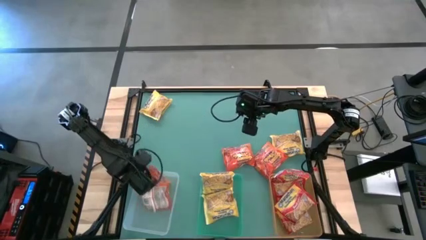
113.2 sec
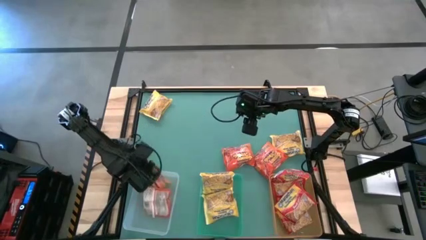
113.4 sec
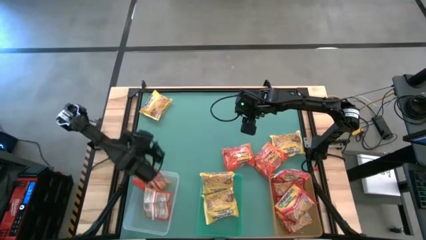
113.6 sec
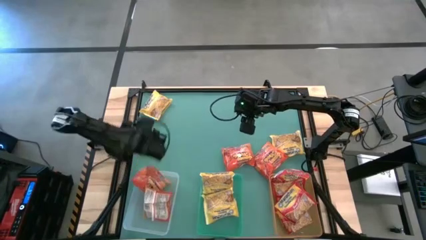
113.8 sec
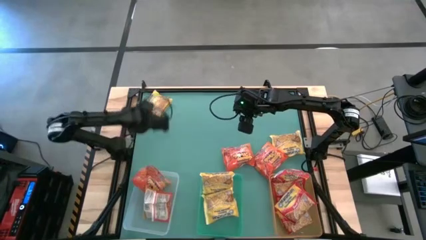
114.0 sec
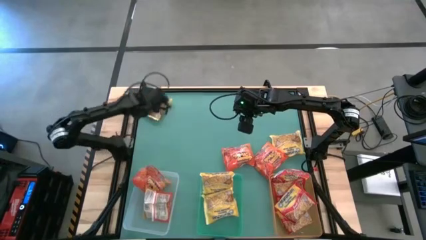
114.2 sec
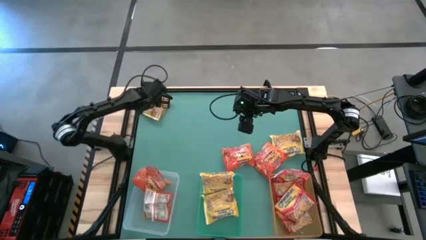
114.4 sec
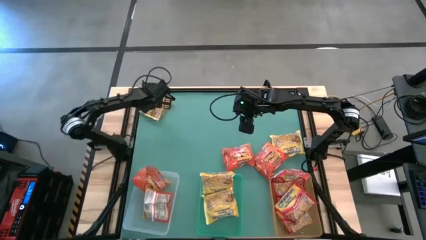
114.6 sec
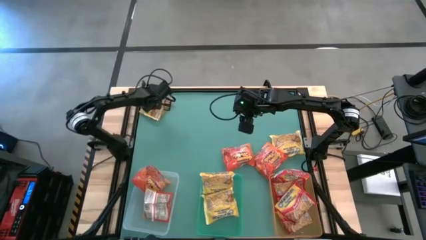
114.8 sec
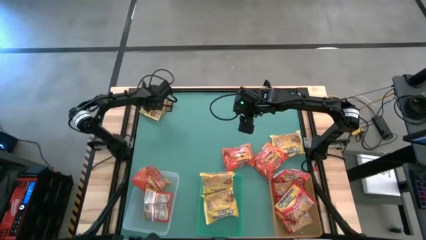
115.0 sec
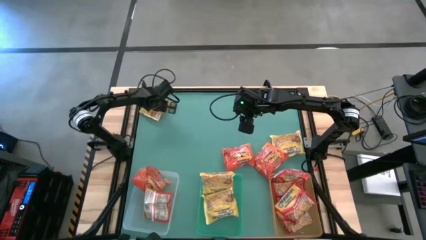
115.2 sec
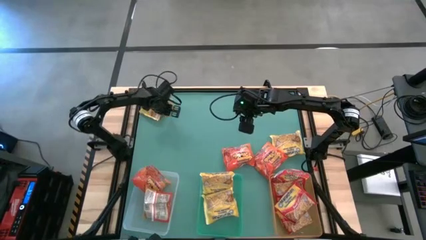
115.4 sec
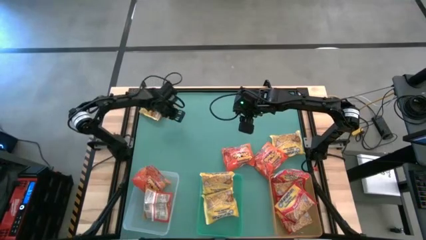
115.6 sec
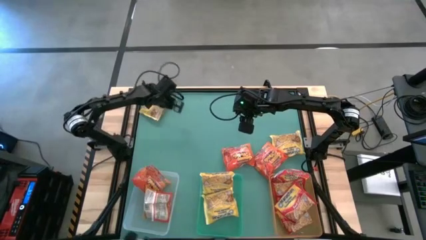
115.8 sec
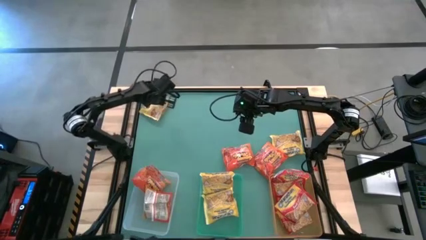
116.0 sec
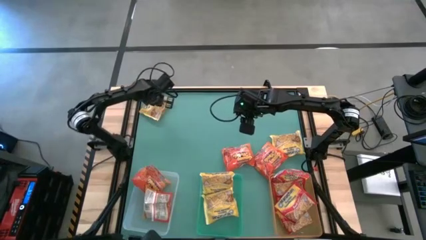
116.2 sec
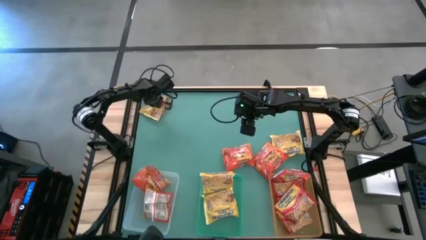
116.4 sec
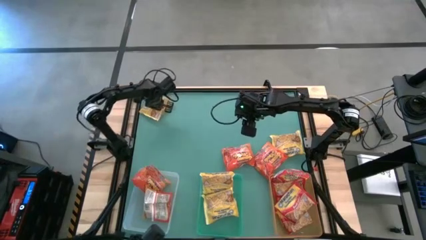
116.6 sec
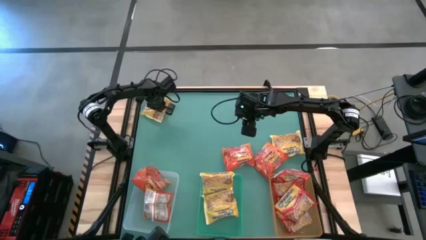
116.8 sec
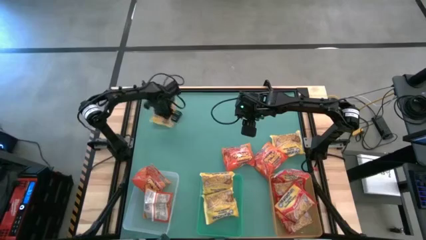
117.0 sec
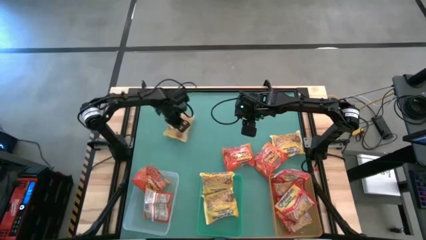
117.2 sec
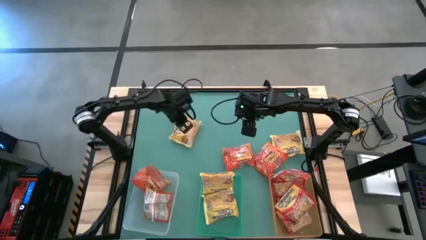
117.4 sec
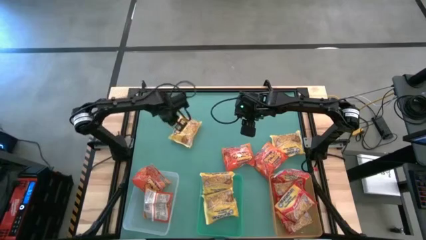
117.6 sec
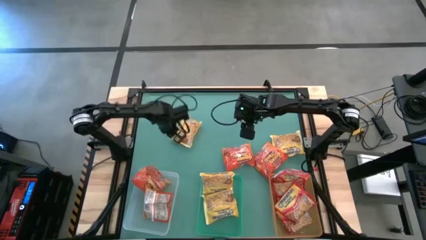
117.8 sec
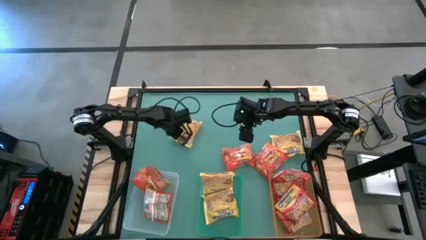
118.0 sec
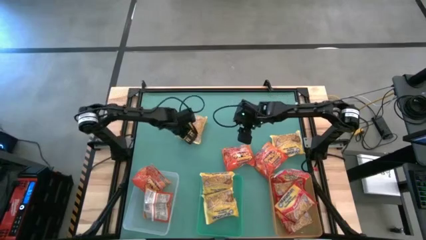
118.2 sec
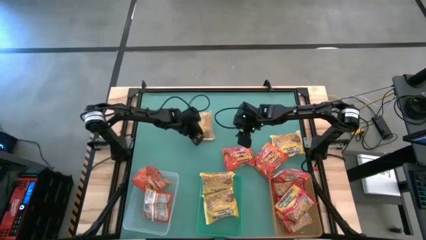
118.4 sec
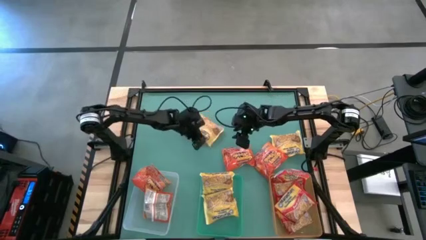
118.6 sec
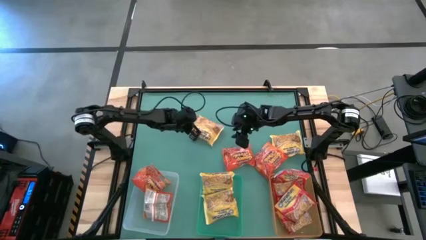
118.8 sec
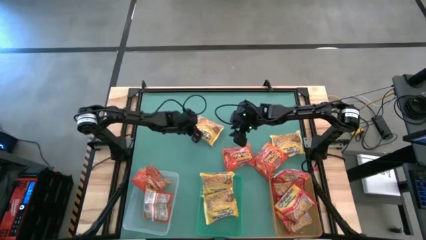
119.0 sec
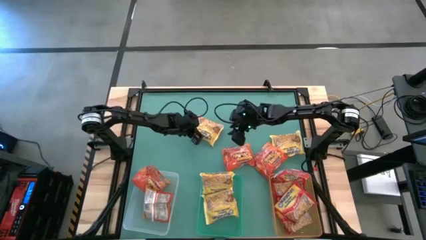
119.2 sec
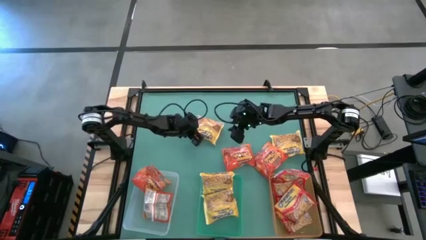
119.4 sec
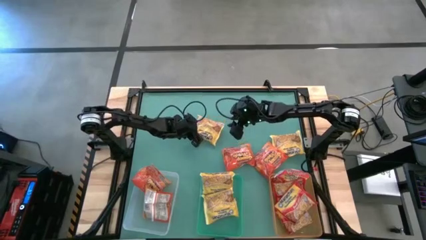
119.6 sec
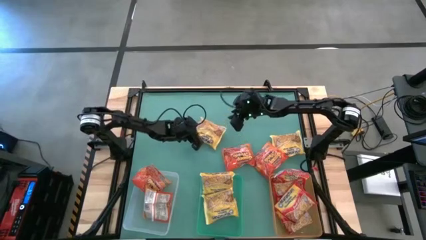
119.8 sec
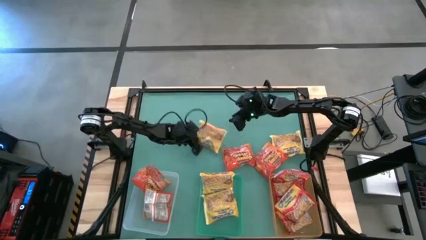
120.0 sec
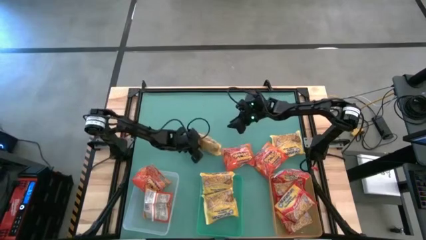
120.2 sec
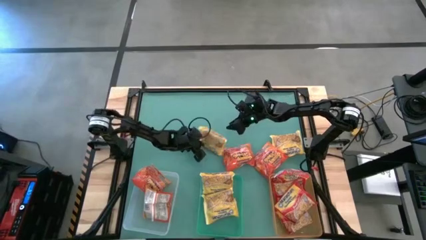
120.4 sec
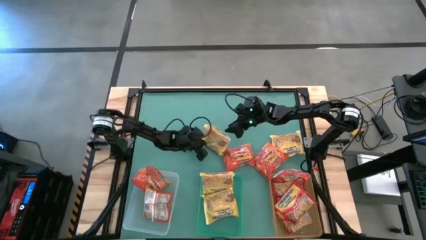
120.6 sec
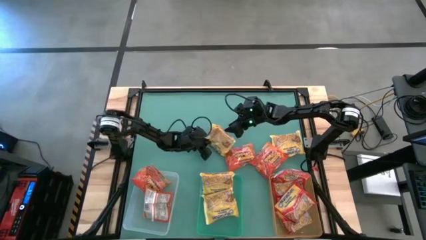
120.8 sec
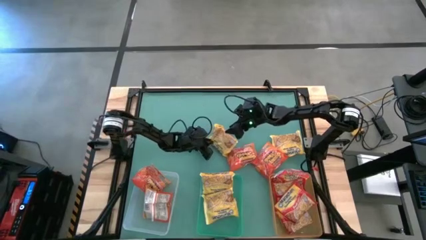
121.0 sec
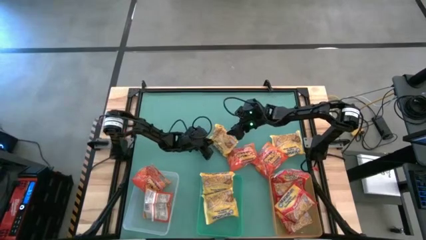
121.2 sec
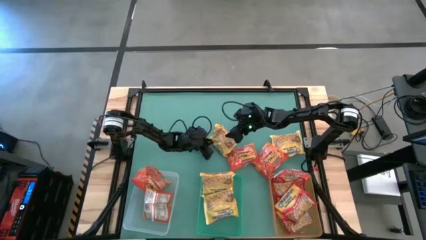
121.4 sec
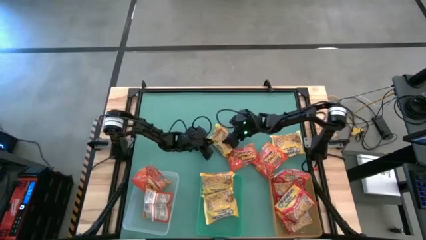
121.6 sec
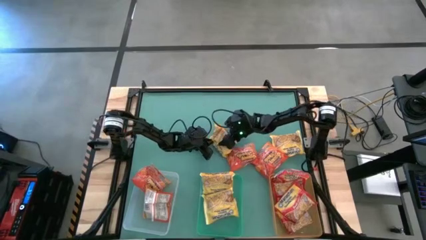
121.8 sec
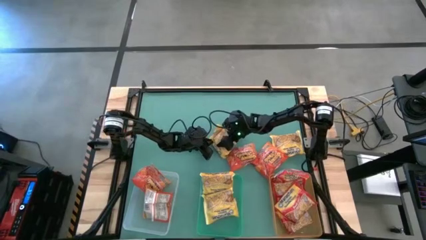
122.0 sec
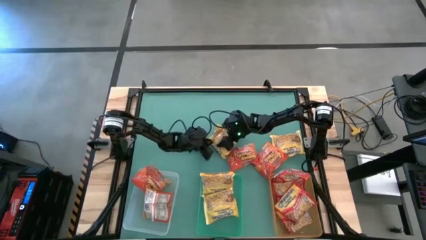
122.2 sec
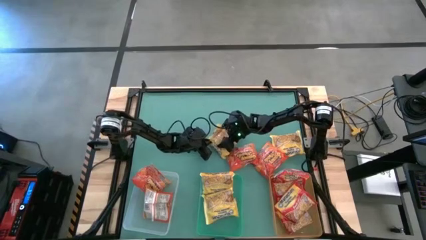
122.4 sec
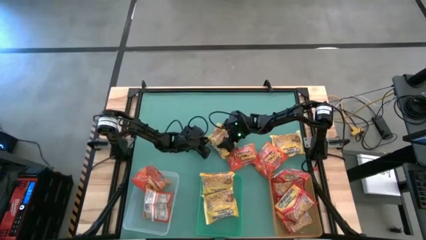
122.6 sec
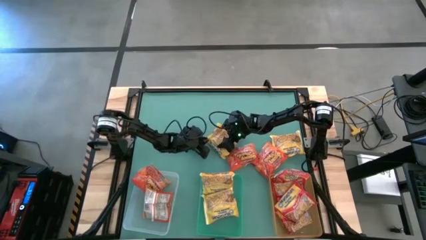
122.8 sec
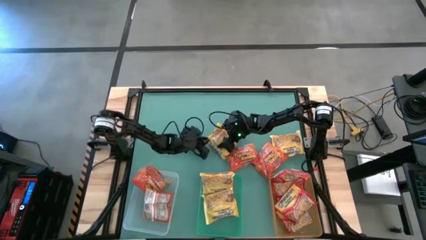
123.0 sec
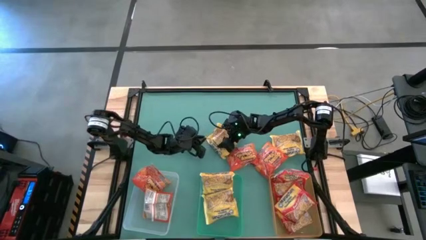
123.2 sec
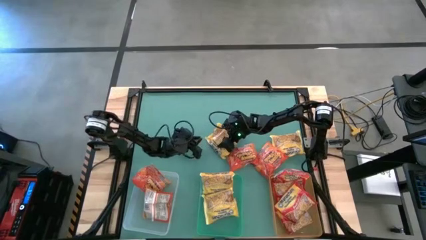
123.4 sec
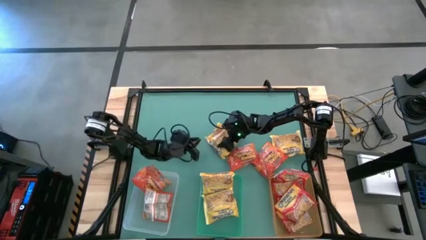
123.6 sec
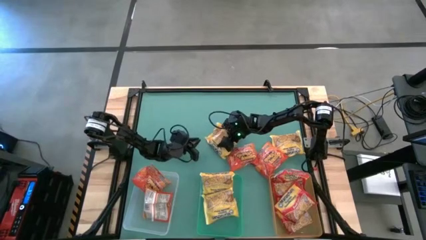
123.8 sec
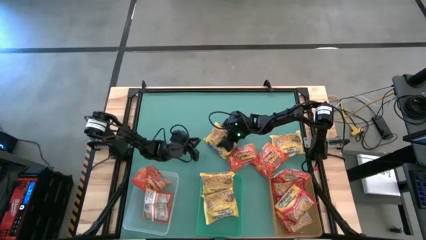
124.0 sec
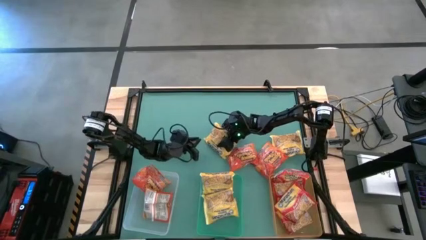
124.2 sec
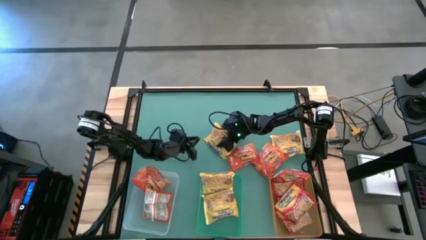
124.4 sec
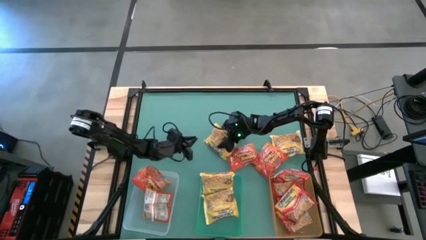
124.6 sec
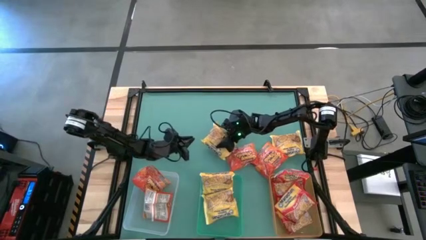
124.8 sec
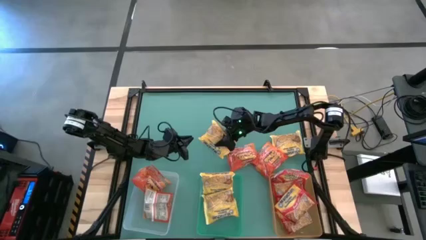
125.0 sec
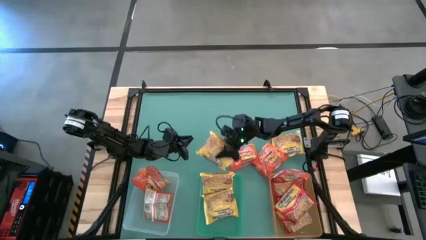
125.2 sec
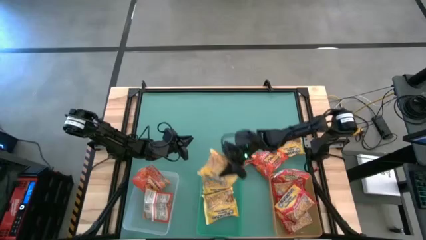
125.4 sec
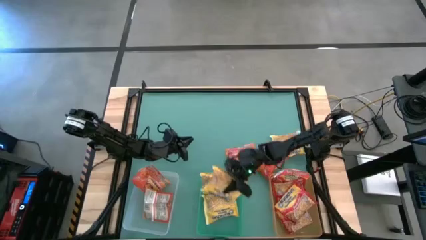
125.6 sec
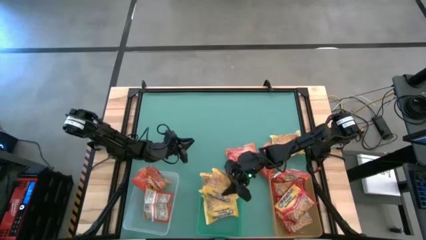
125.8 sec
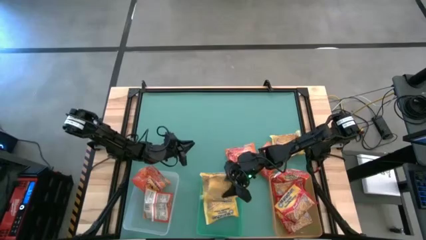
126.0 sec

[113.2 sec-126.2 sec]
Task: Sort Maruchan noodles
Put the yellow noodle pack into the green bin

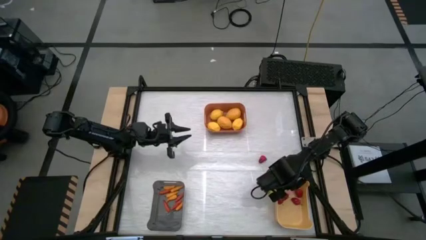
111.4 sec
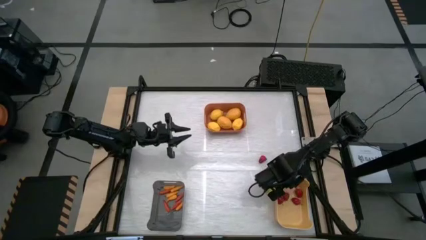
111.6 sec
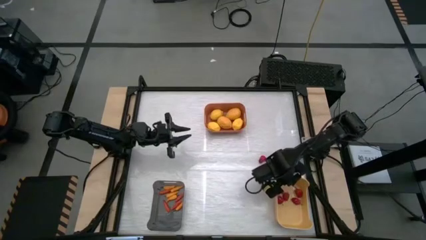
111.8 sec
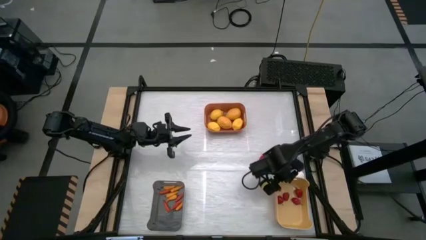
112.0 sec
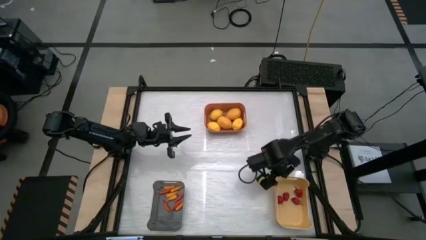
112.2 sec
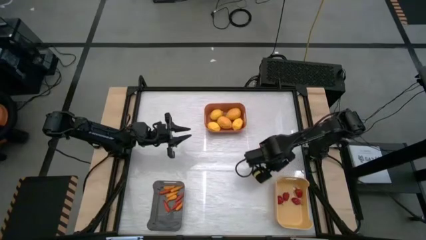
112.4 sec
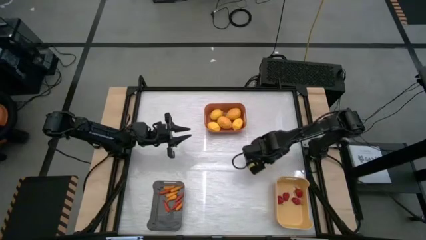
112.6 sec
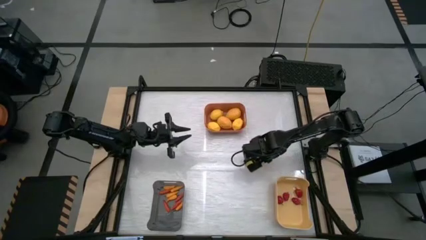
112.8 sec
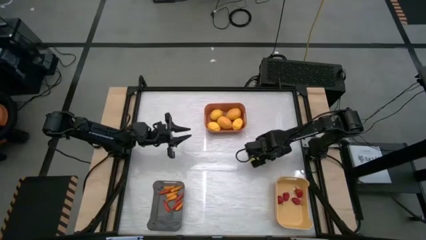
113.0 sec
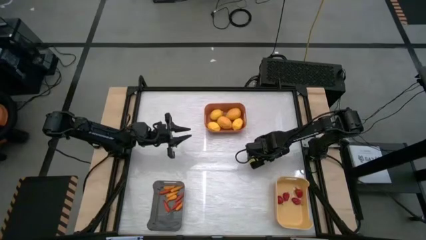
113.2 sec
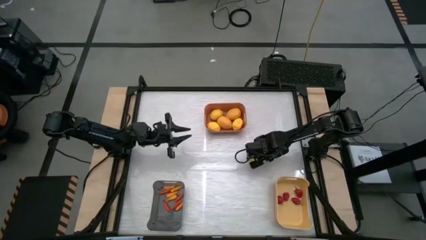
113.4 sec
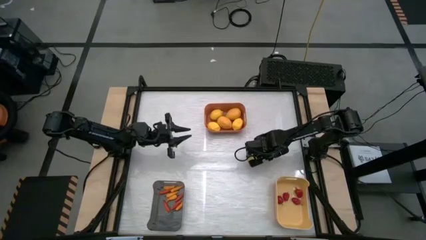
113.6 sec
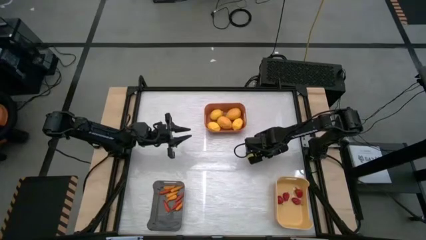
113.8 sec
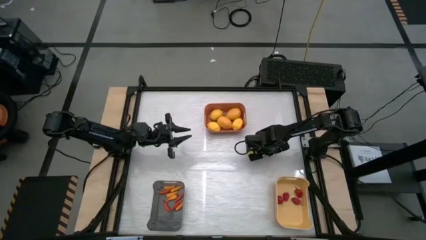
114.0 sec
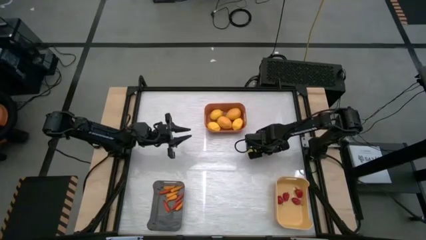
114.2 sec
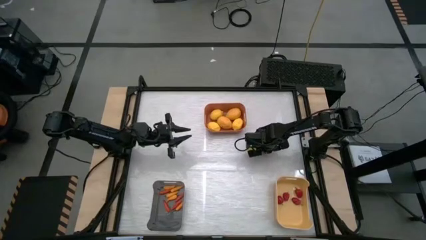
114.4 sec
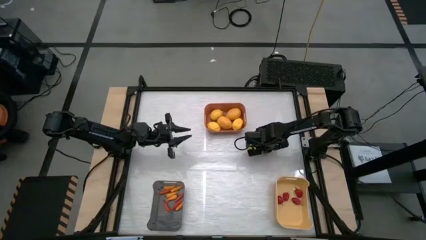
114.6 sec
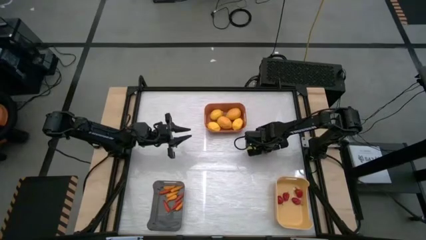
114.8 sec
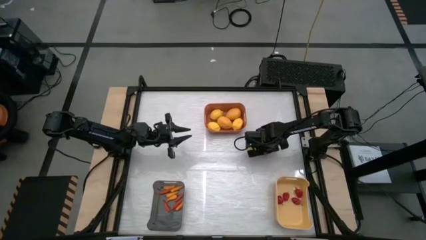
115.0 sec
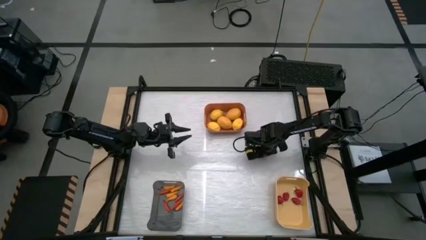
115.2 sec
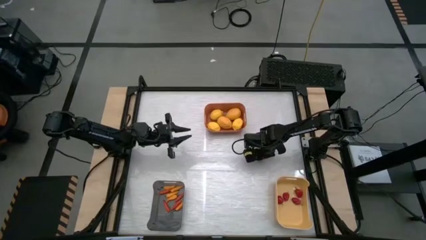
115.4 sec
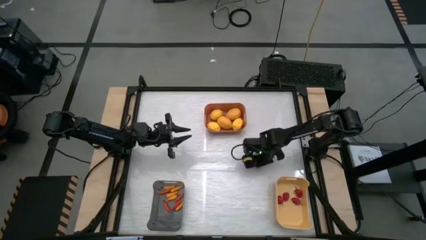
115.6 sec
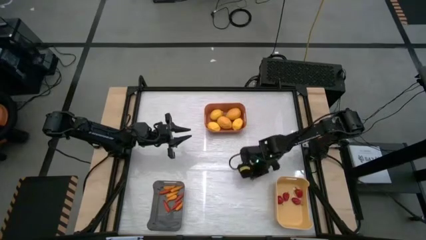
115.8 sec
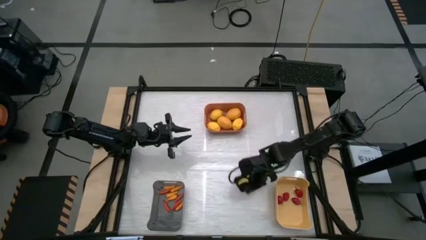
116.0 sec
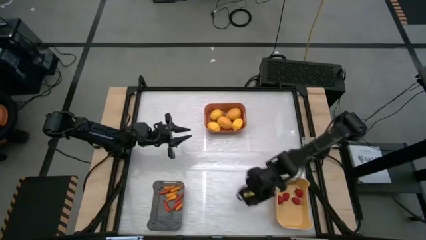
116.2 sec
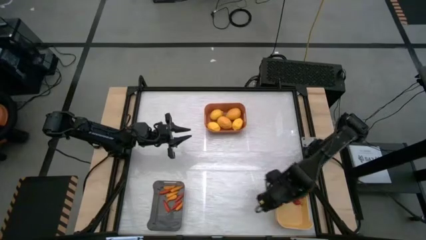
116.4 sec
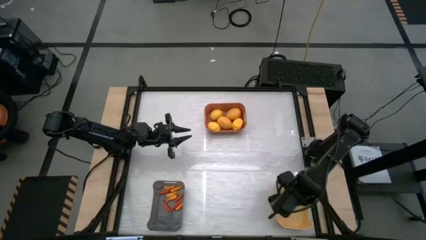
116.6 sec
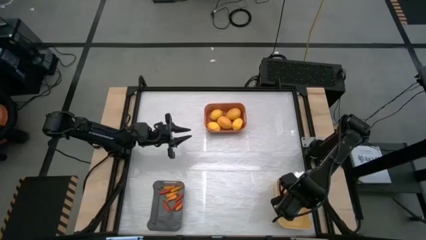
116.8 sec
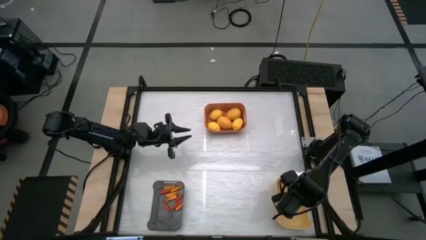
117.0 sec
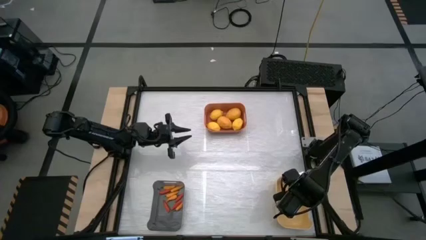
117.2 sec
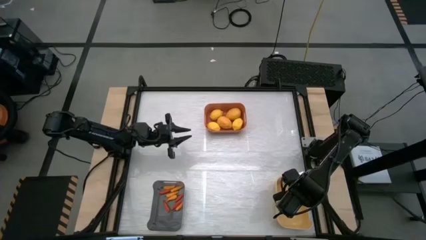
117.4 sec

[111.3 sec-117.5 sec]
Task: Sort produce into baskets
Put the red chili pepper into the yellow bin
